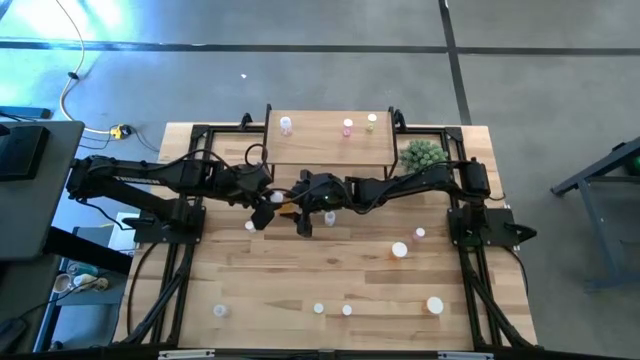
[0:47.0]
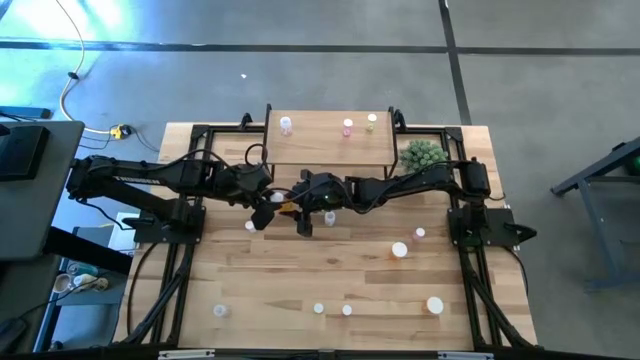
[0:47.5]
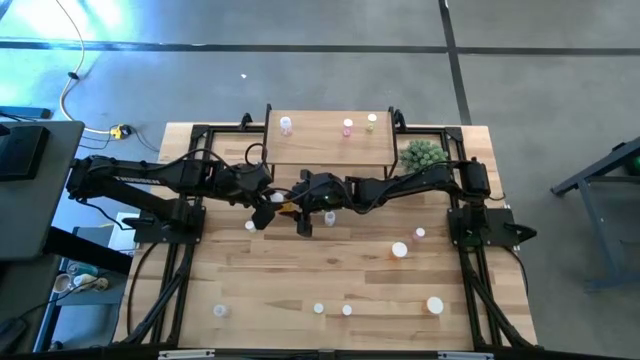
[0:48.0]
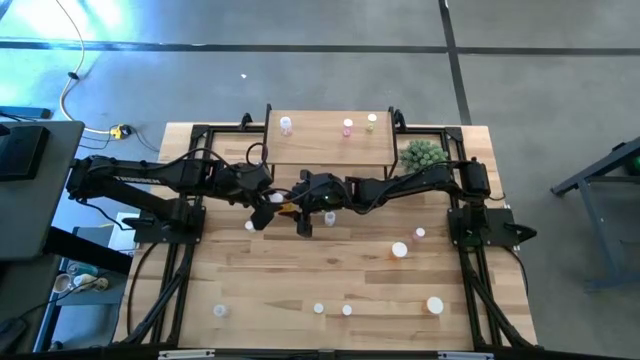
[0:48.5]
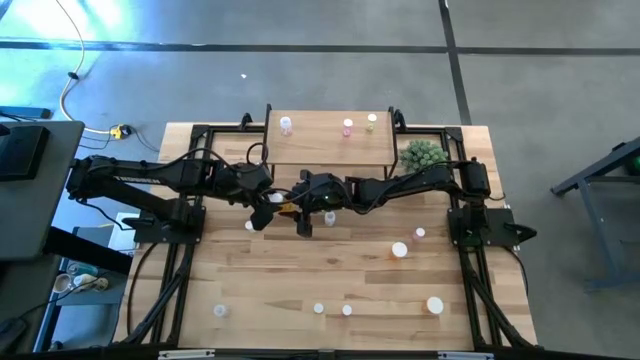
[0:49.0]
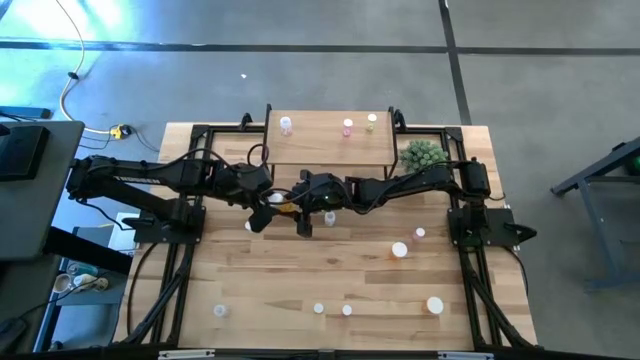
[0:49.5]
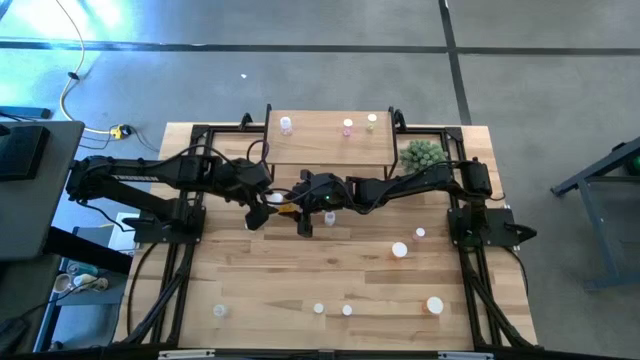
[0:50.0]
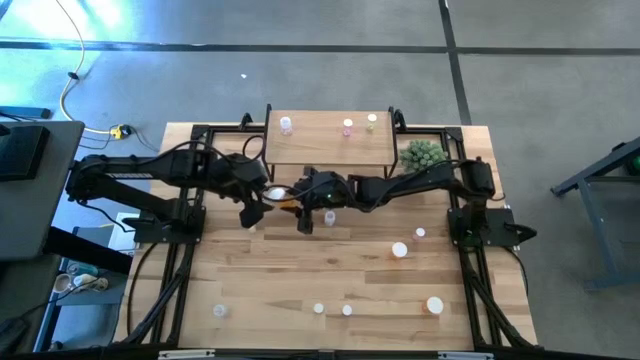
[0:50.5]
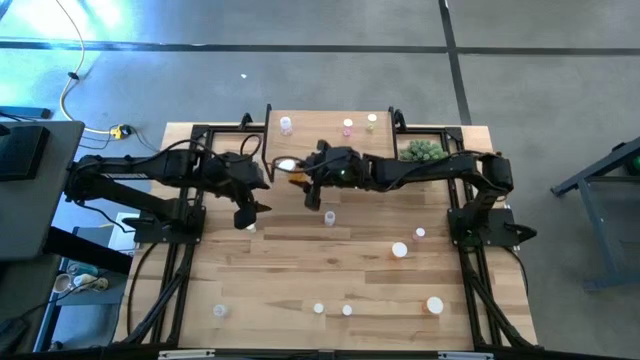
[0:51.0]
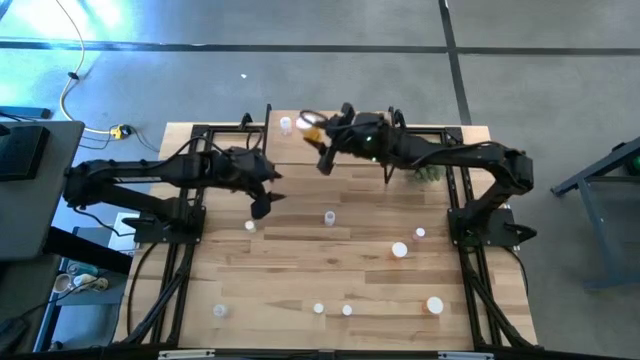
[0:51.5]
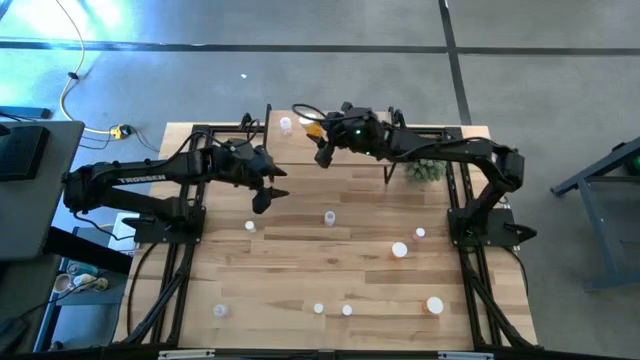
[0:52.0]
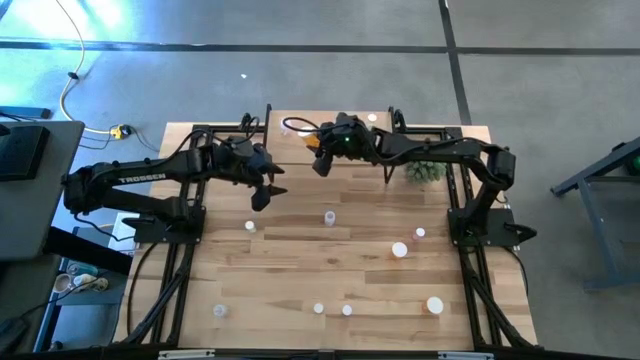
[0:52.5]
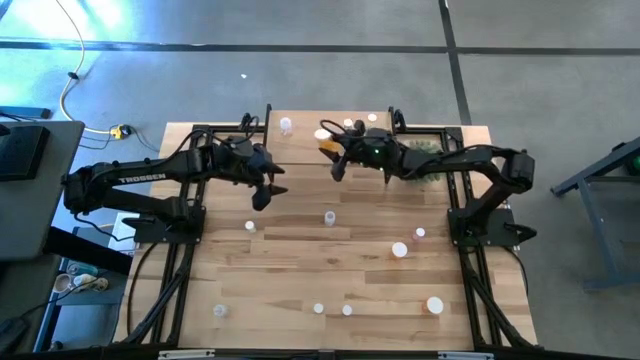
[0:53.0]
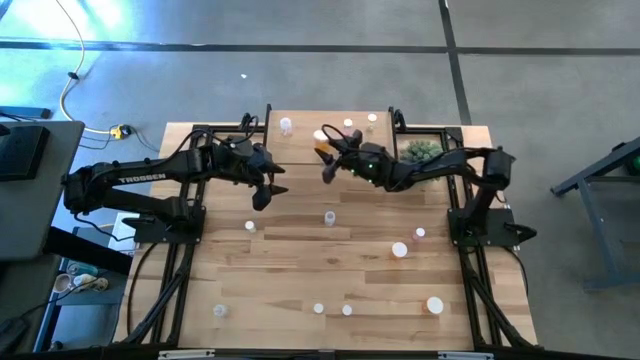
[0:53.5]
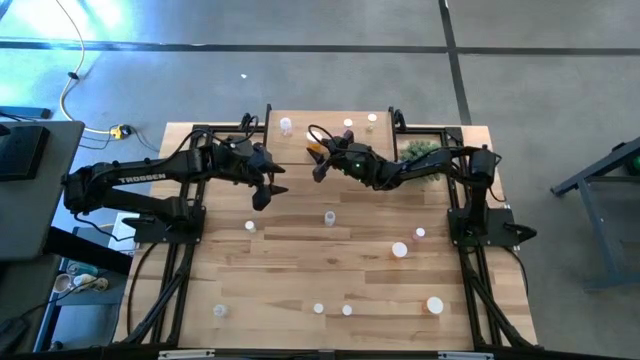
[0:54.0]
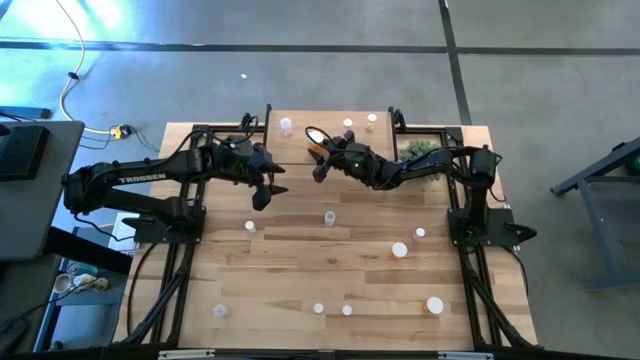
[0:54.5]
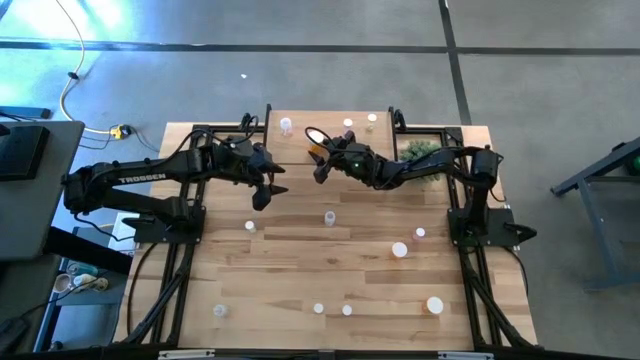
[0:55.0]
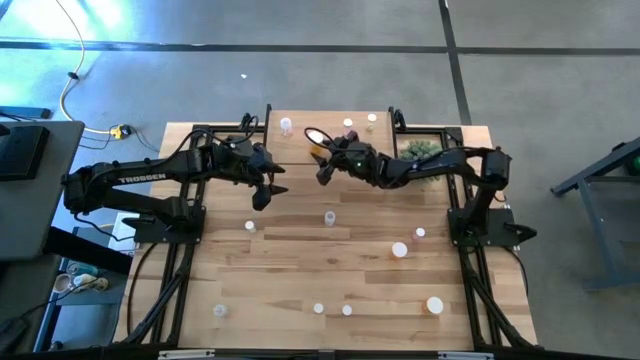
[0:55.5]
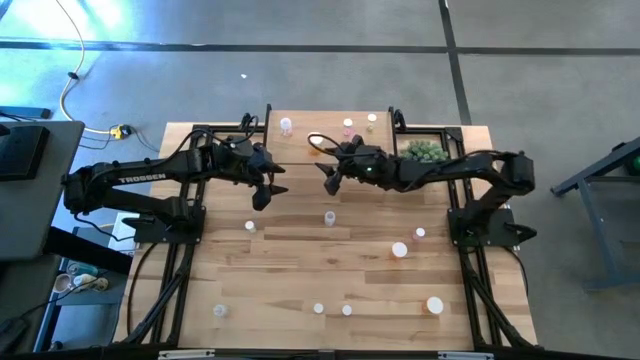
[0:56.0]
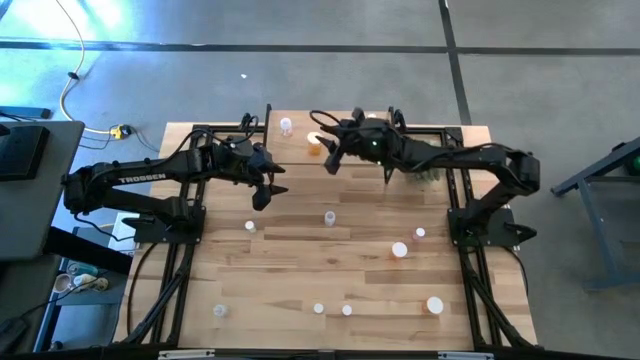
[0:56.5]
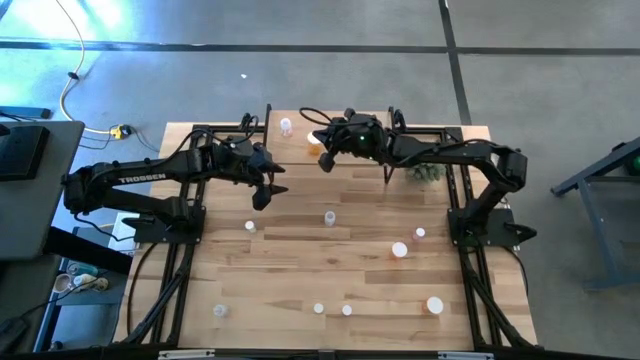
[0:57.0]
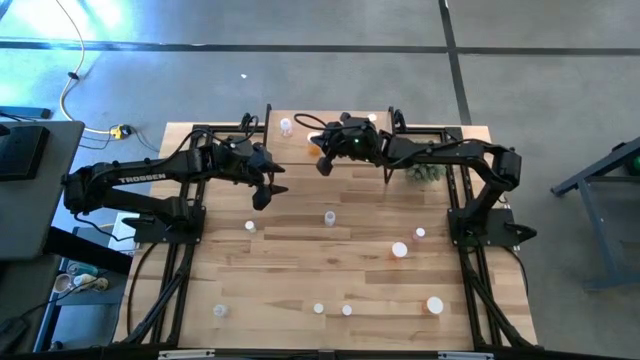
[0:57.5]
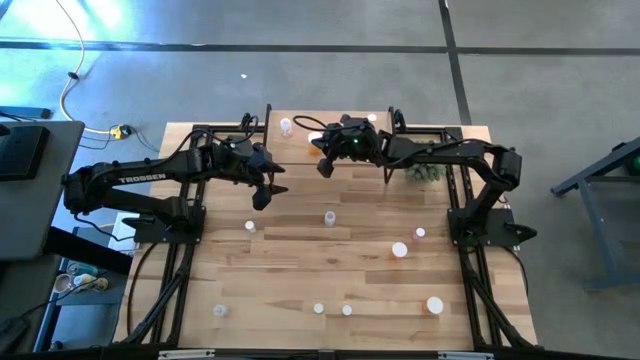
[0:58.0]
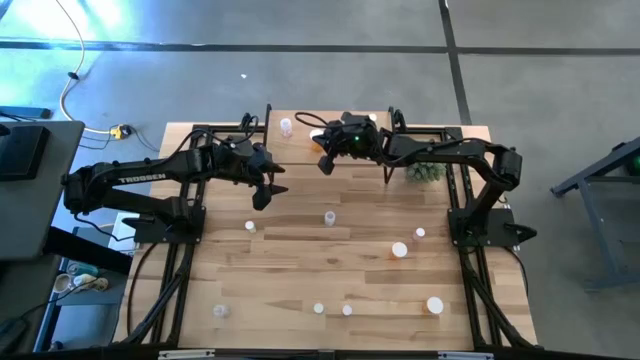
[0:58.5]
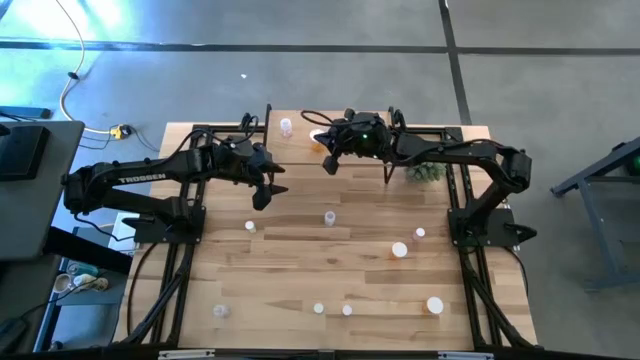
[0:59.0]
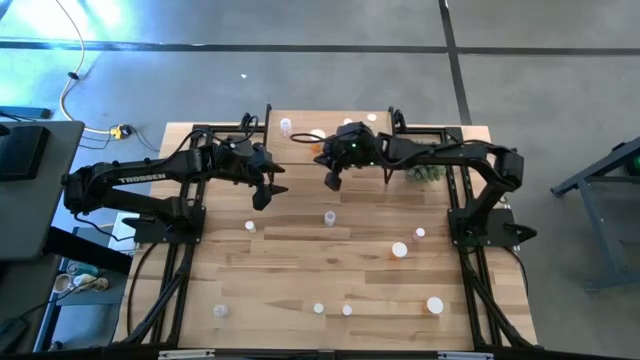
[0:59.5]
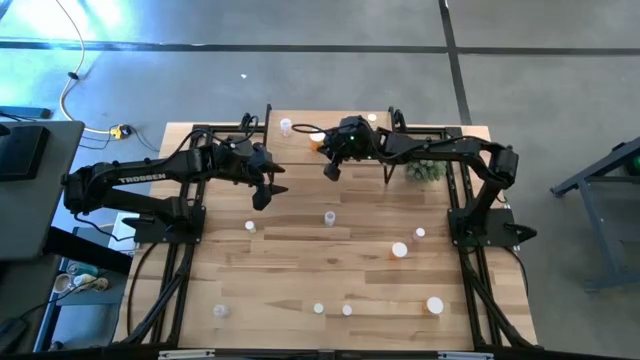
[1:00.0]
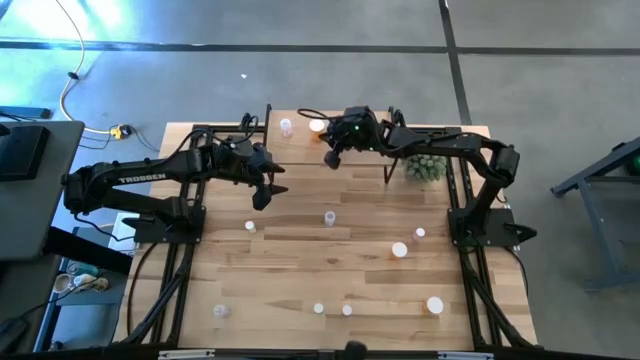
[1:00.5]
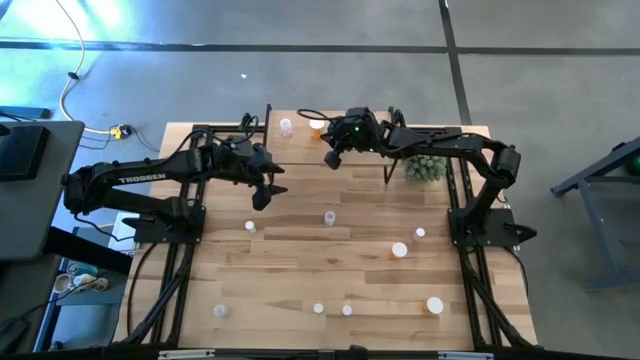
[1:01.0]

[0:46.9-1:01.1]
Task: Pick and place medicine bottles onto shelf by color
Put the top orange pill bottle on the shelf

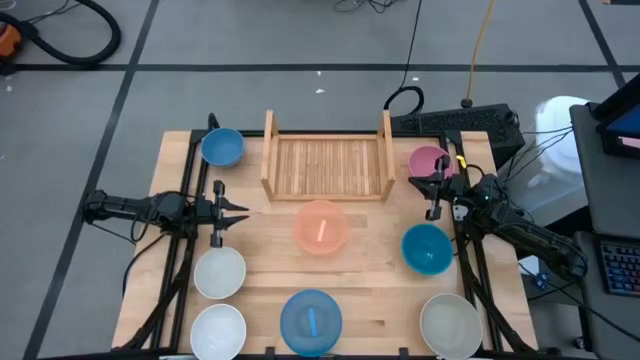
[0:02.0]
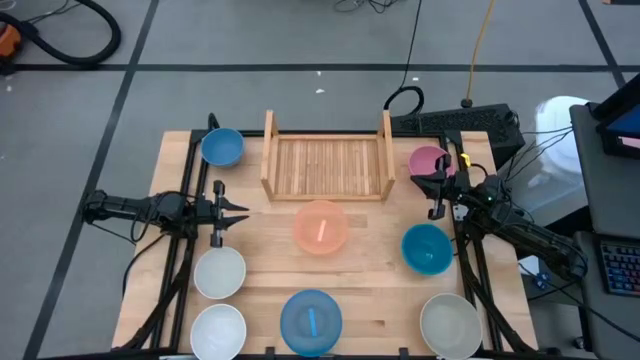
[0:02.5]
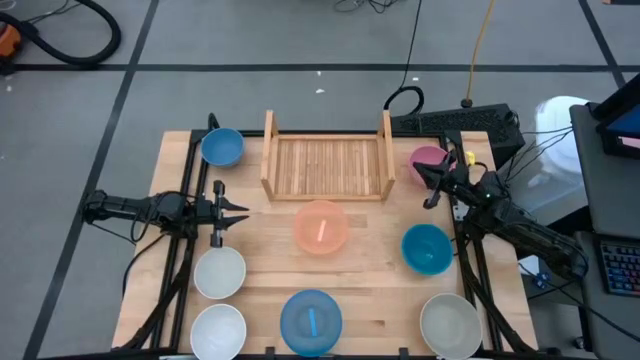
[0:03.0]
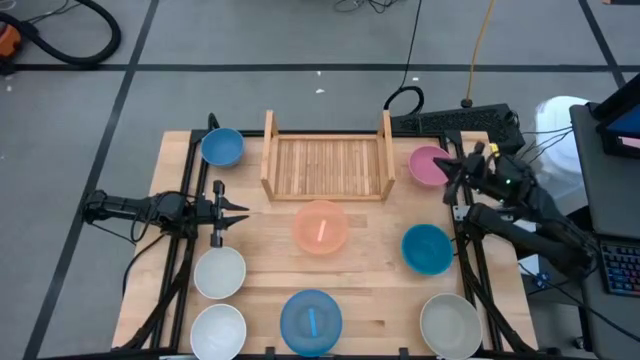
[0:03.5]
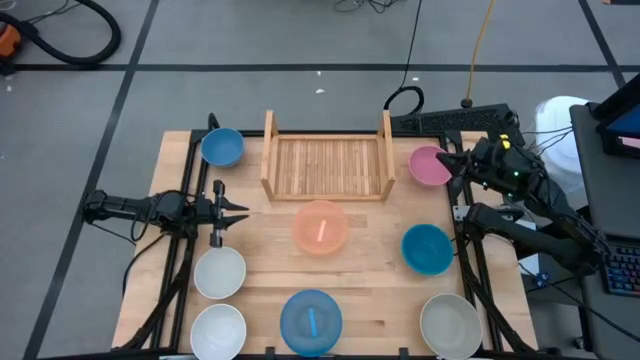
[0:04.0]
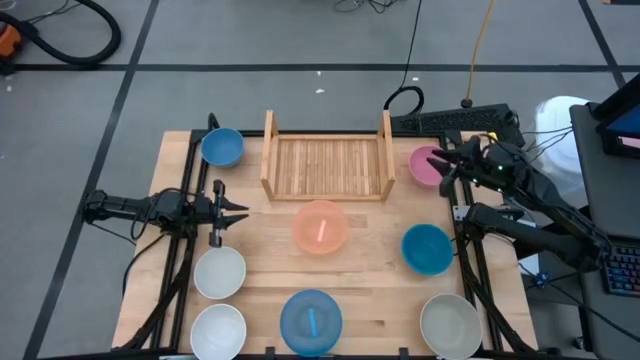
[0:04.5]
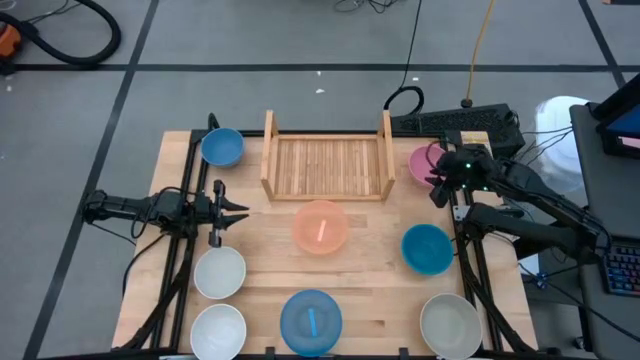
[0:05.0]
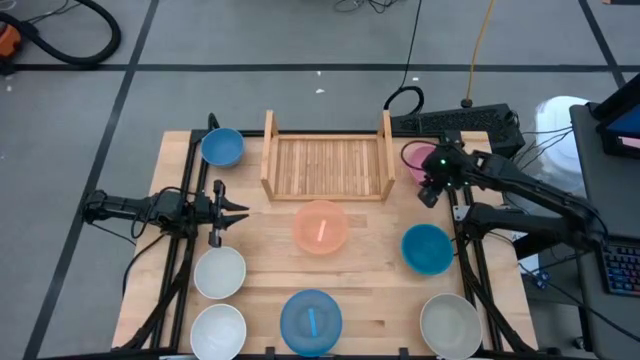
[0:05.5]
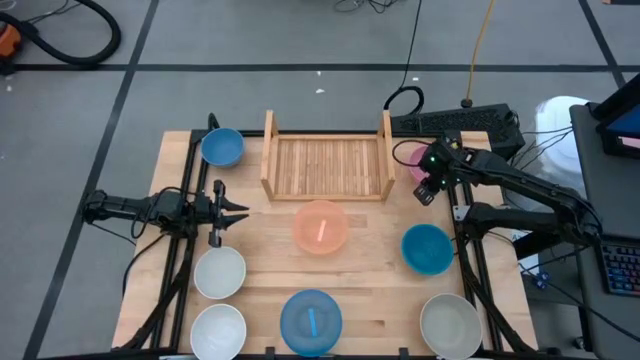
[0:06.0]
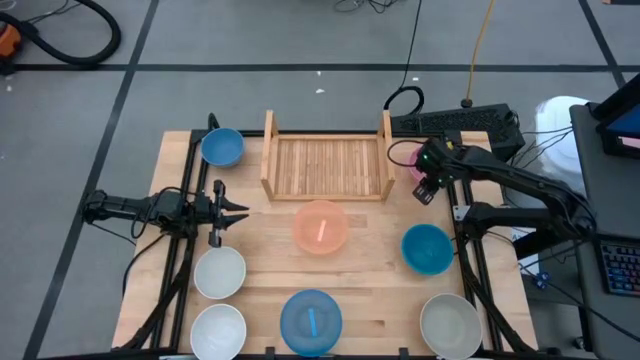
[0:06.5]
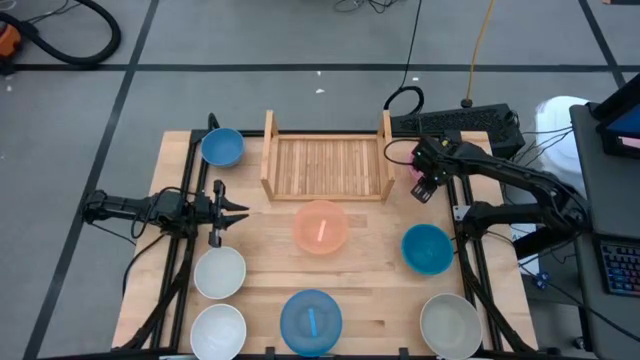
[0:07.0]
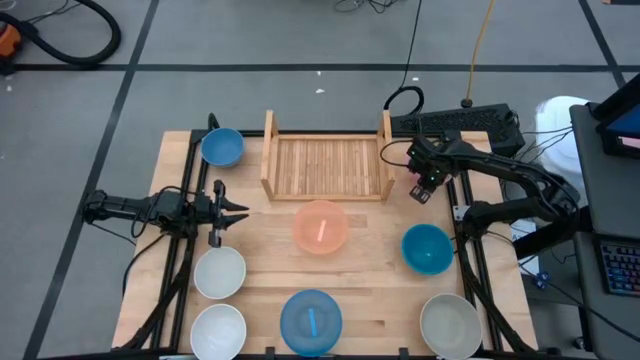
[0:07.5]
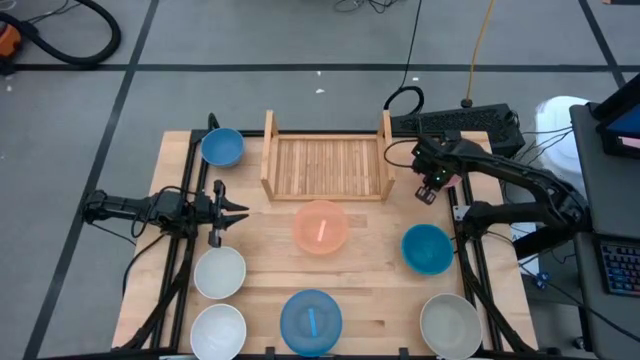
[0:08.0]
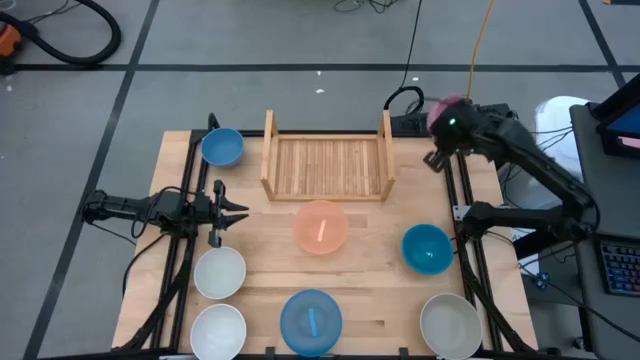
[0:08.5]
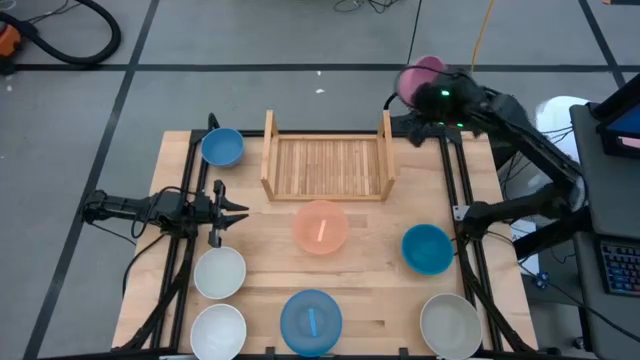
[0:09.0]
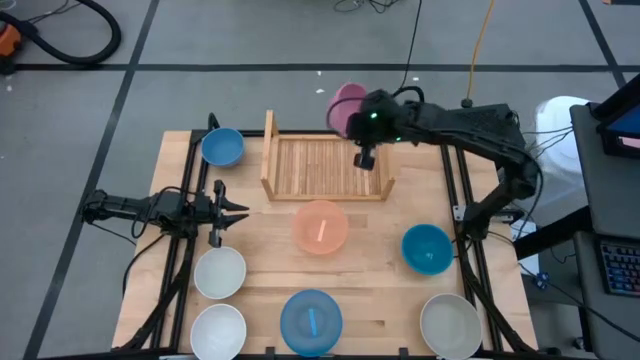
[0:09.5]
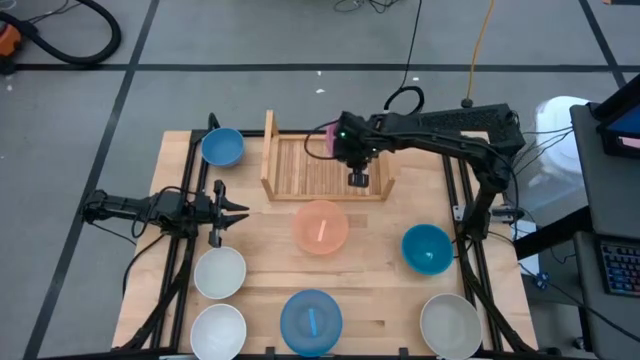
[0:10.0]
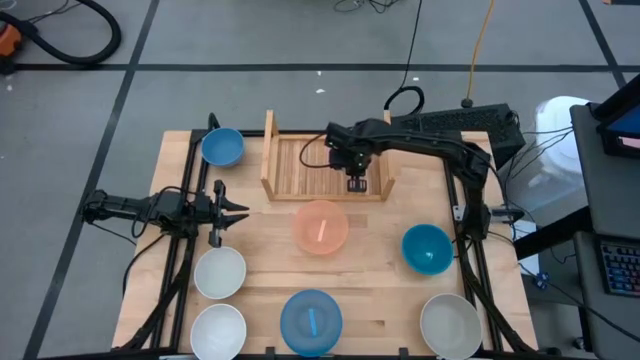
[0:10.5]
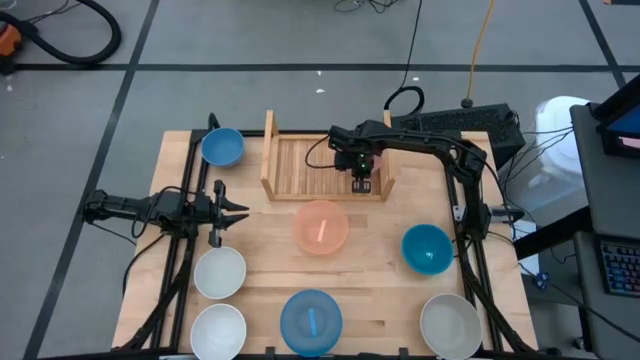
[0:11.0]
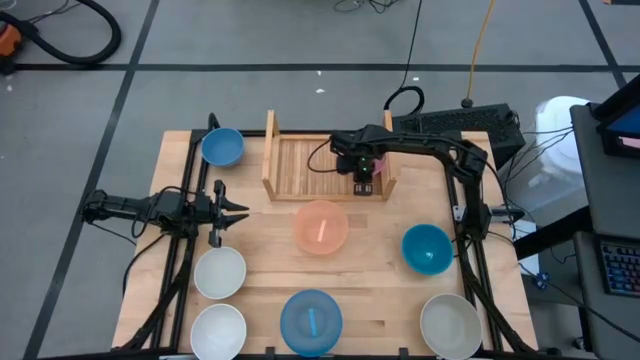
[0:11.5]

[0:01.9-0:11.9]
Task: Place and stack bowls onto a shelf
Put the pink bowl on the shelf
